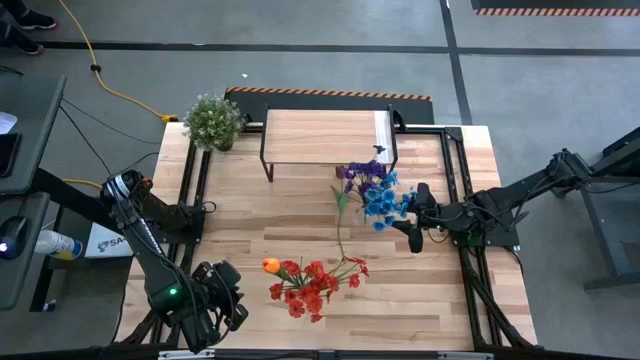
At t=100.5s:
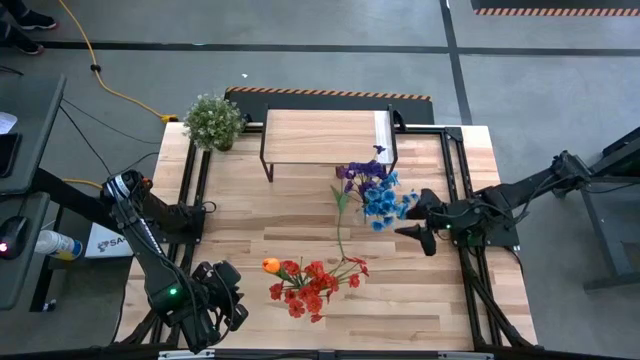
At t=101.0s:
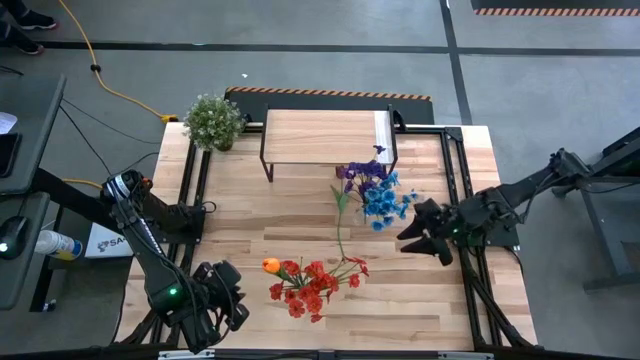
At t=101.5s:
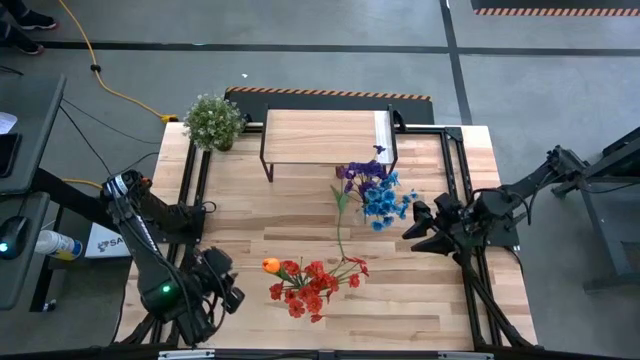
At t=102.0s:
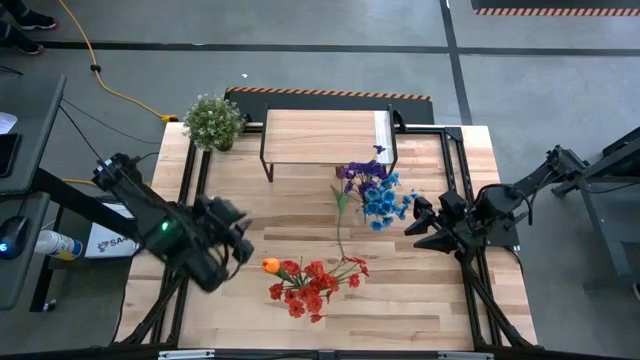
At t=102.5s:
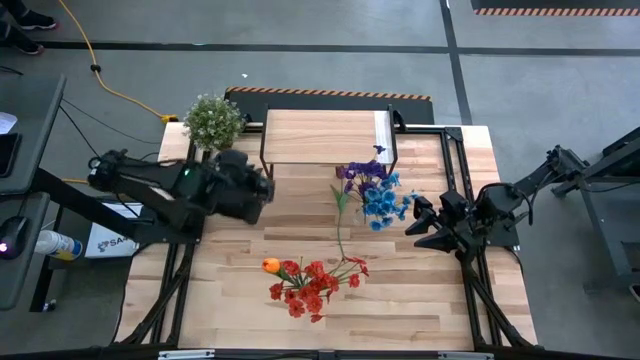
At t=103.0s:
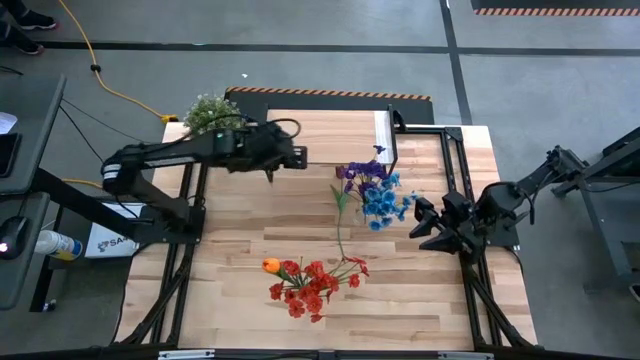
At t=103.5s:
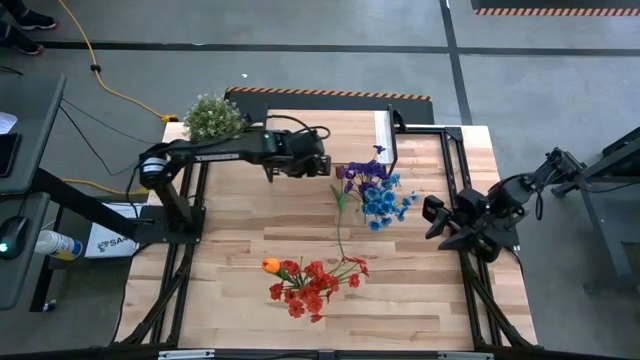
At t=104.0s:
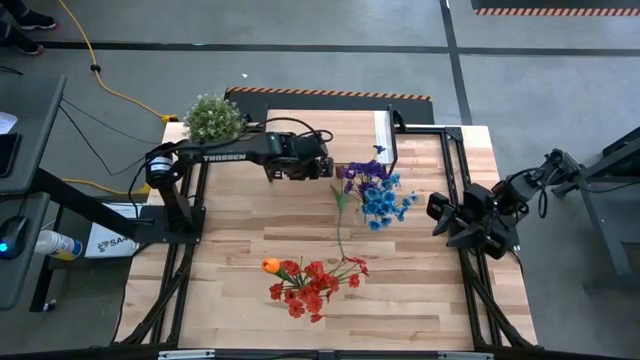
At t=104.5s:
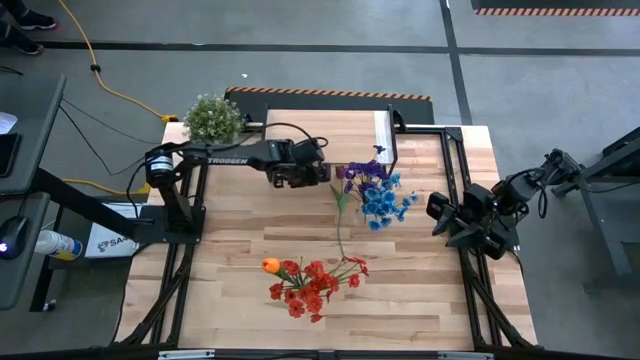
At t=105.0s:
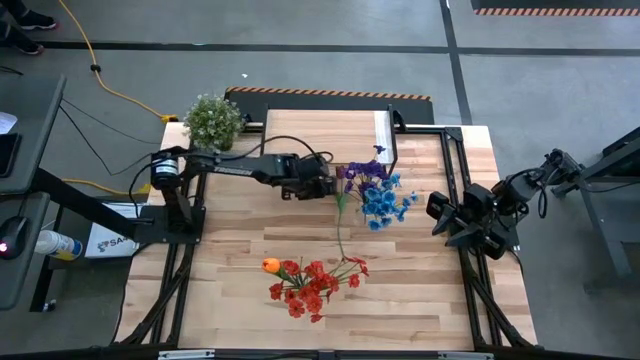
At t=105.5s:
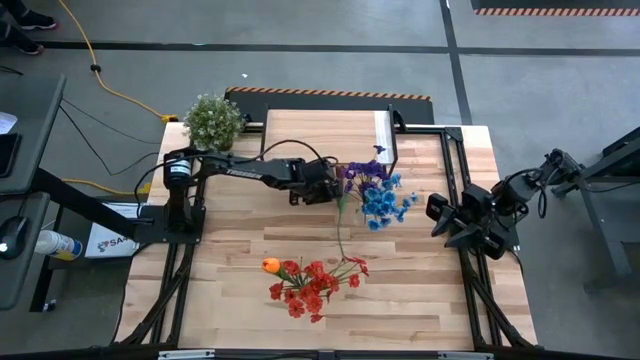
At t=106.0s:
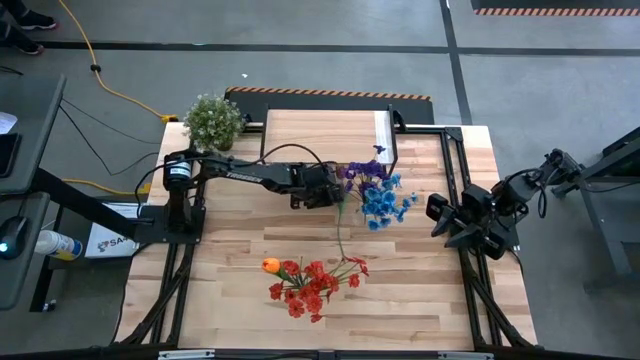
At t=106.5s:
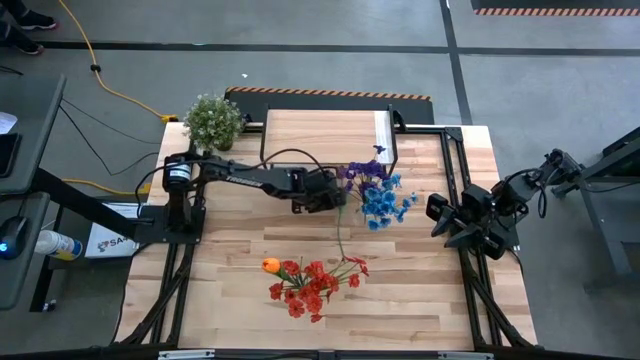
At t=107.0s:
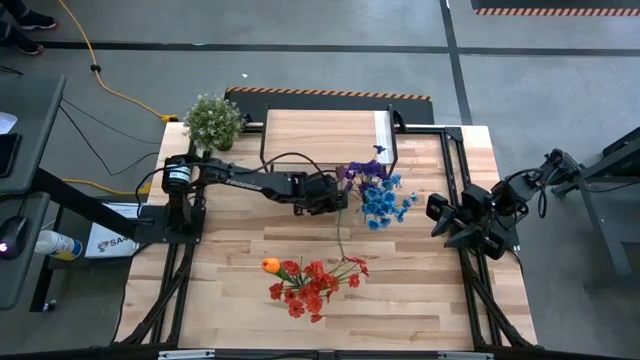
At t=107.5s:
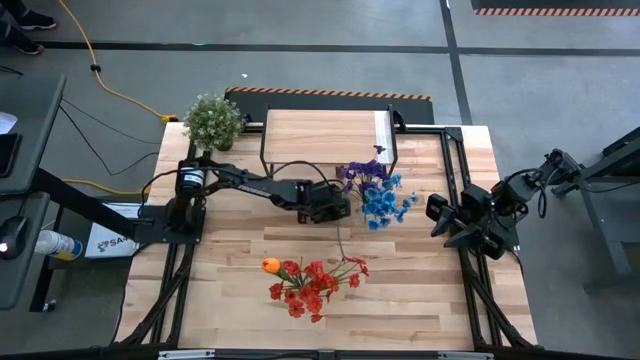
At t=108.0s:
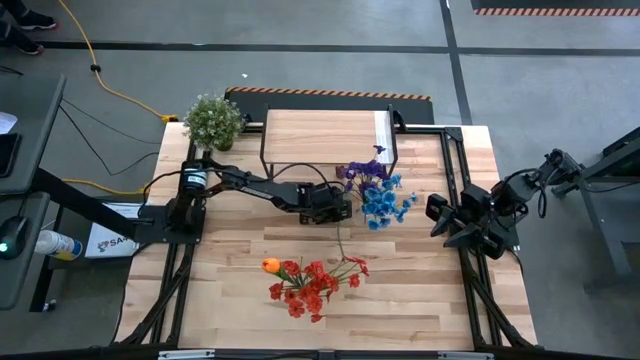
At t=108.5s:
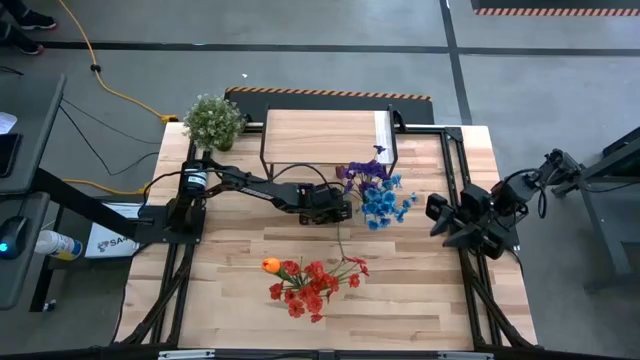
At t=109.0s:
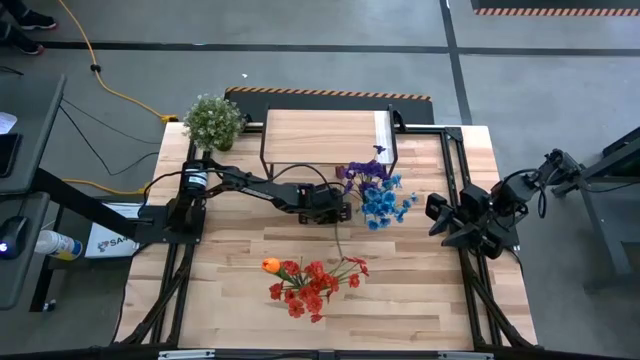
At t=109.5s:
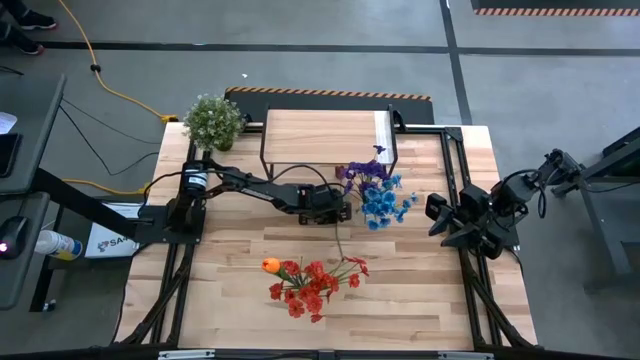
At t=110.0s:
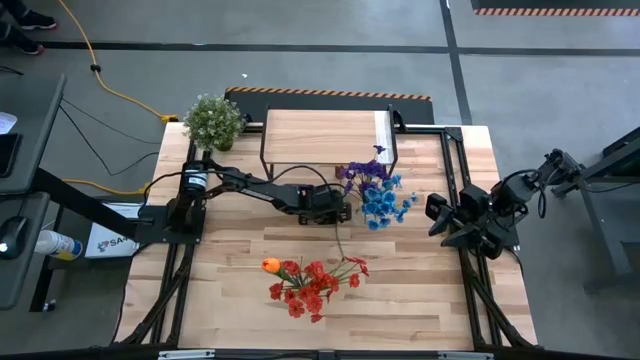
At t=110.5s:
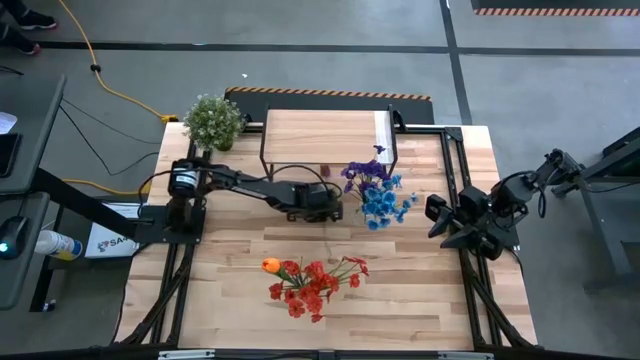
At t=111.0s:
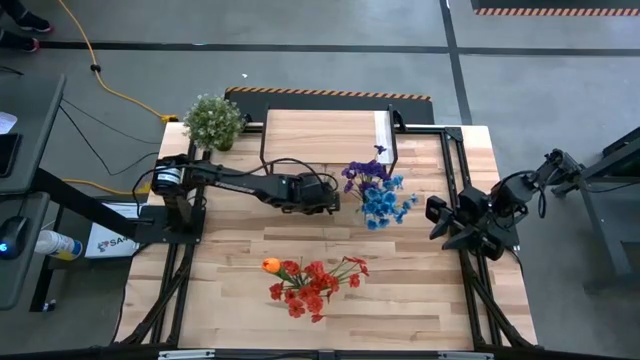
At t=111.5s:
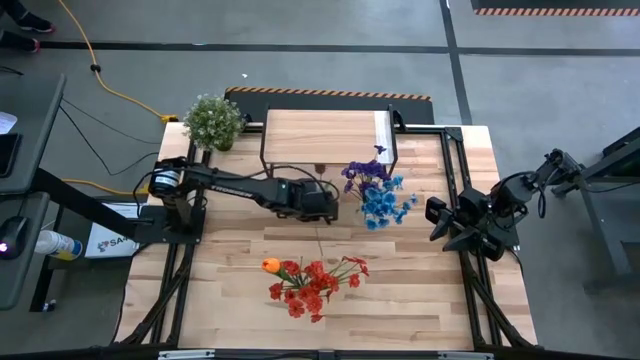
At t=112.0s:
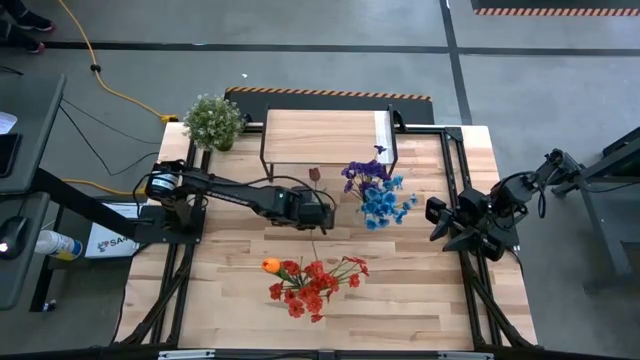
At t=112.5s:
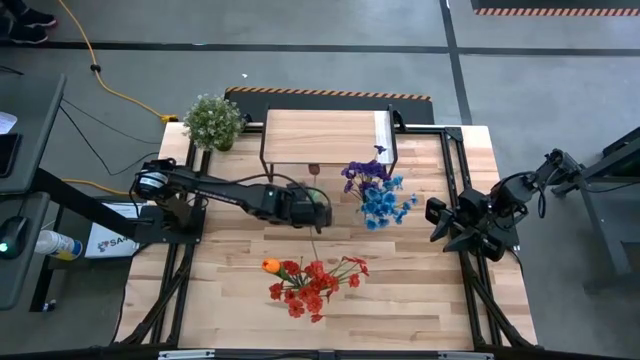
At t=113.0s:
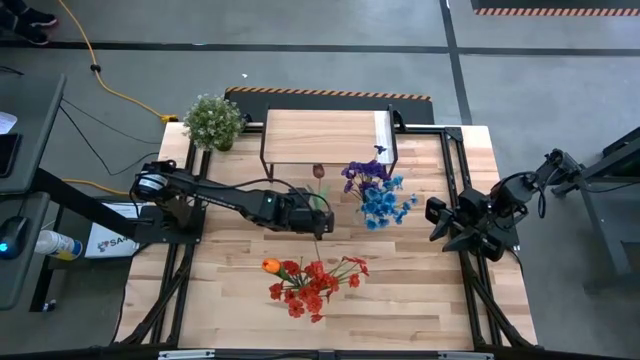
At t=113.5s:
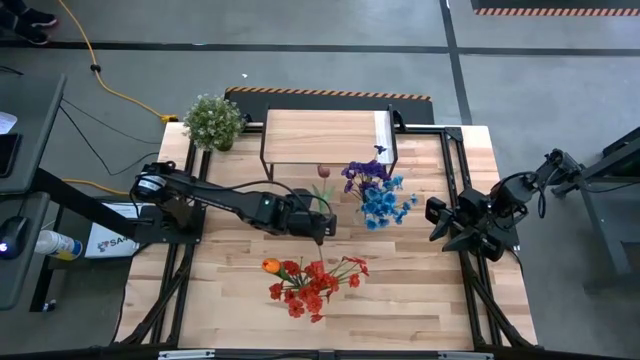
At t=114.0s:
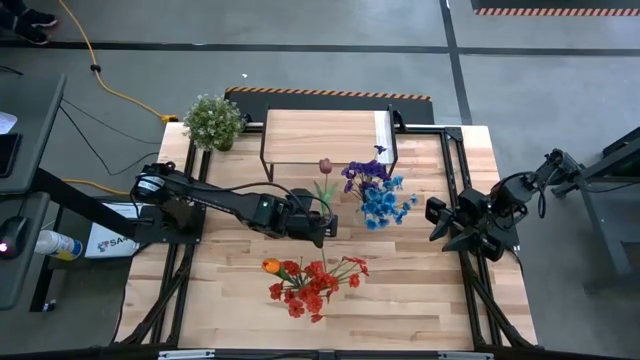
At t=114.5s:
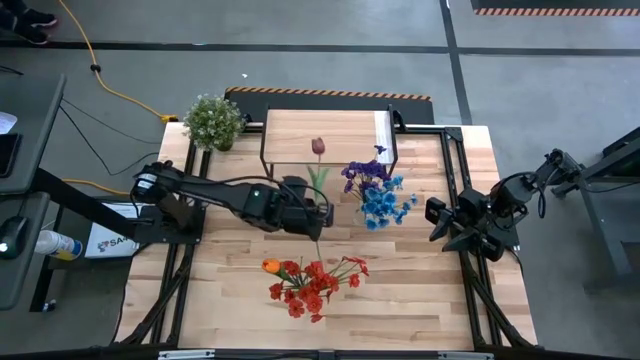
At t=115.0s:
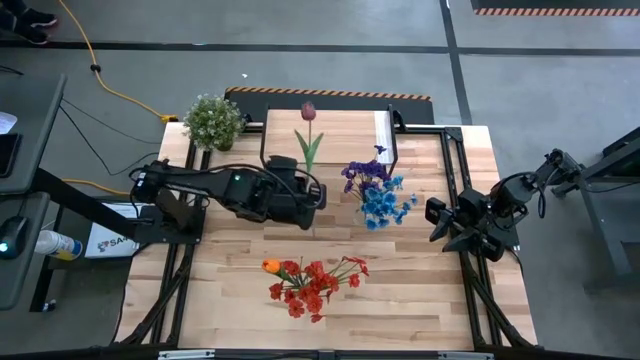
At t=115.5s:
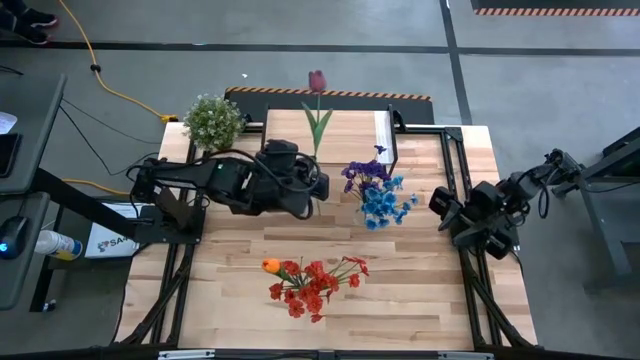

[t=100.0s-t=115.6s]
Task: Pick and place flowers into a vace then onto a shelf
Put the red flower into the top transparent vase

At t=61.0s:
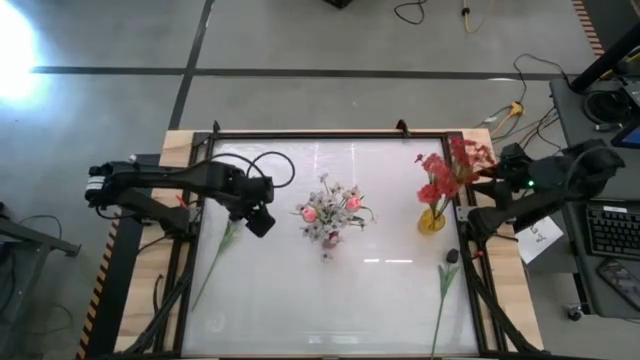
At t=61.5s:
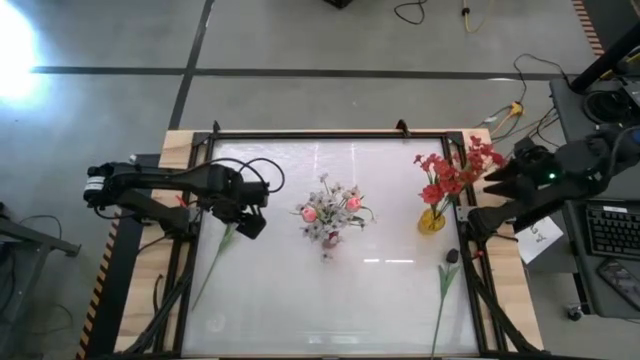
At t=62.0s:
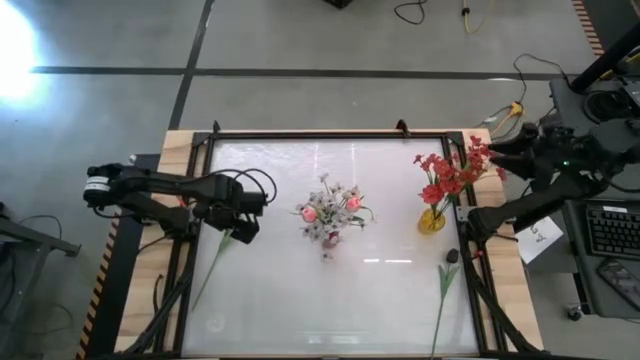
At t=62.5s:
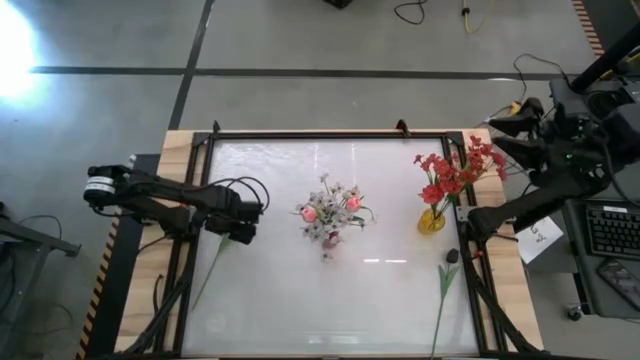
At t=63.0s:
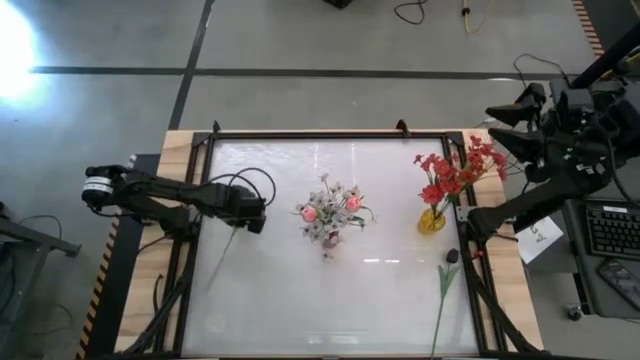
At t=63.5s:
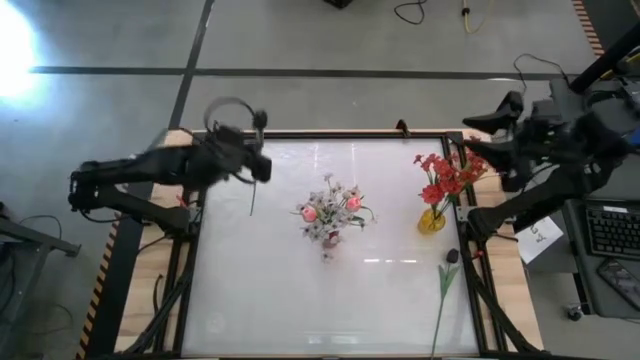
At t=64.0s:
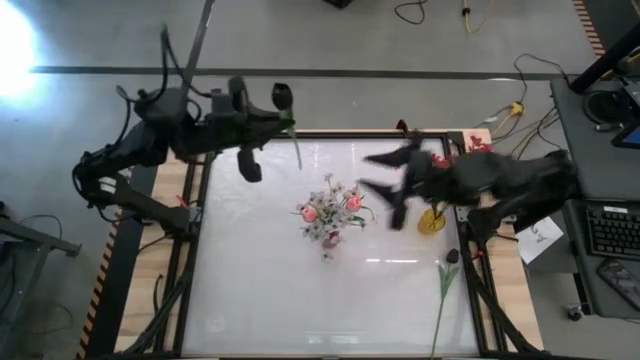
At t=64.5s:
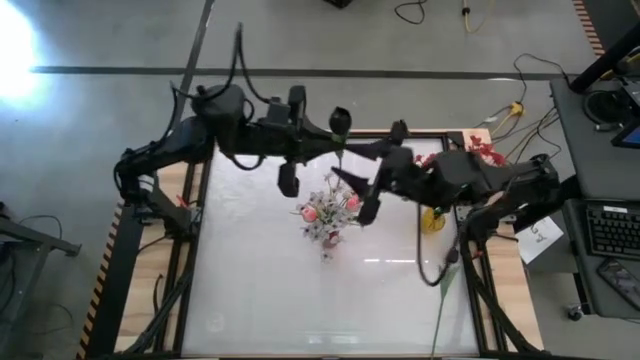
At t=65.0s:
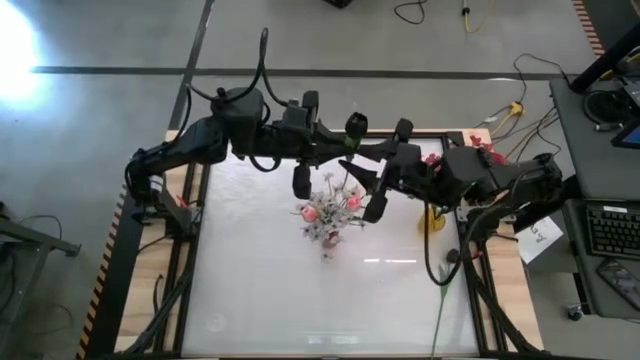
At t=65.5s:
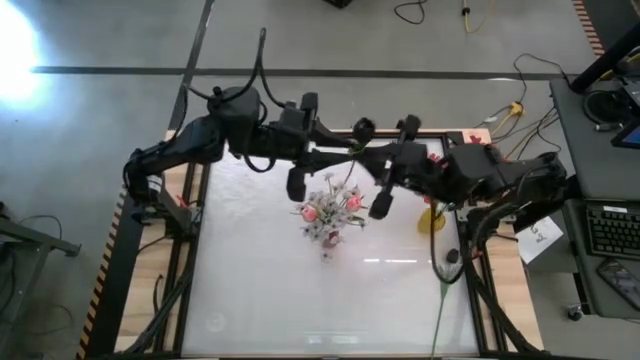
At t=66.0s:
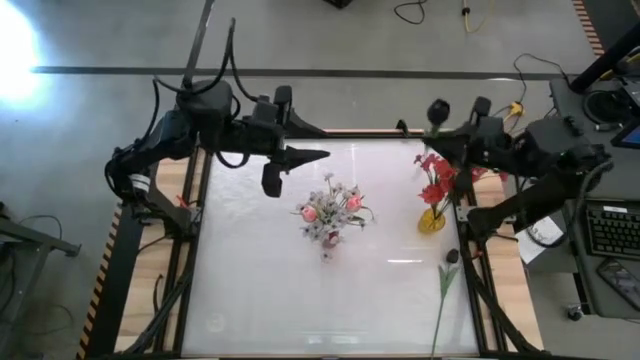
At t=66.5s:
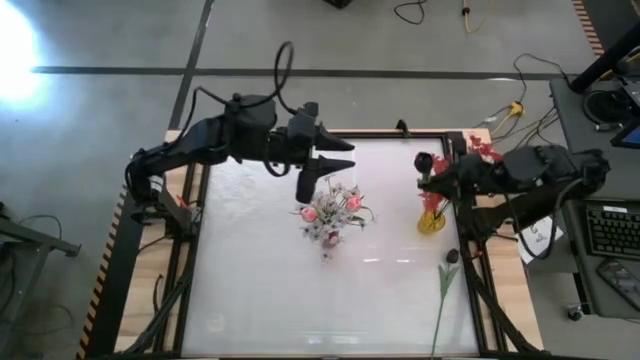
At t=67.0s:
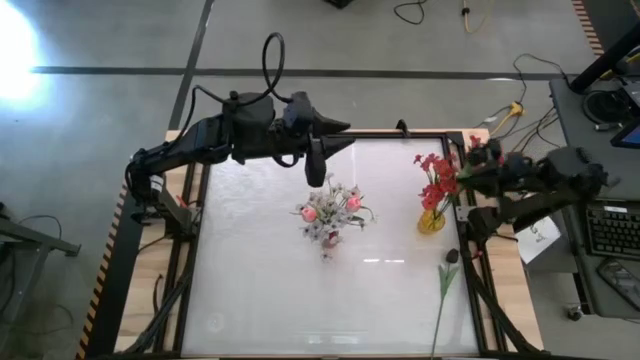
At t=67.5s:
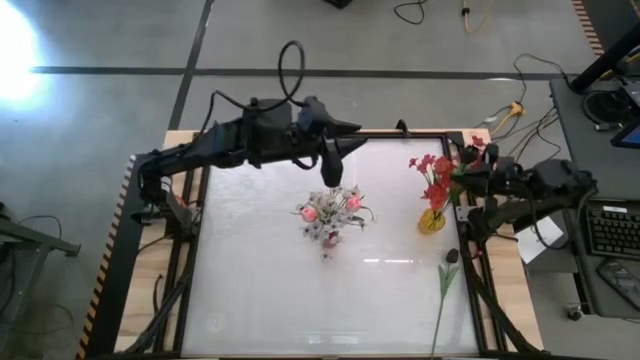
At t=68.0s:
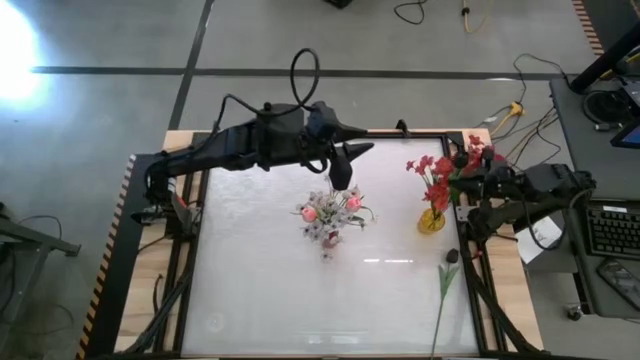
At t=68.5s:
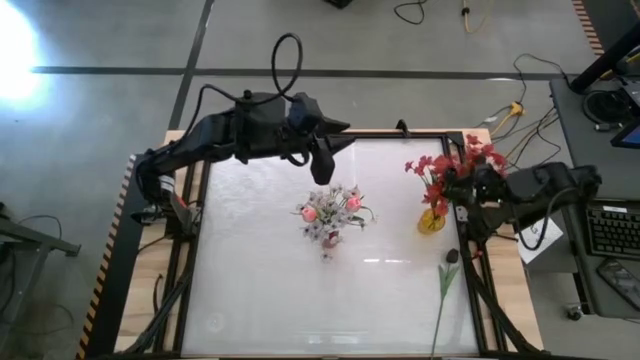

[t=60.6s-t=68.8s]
Task: Sort flowers into vase by color
Put the left black flower into the yellow vase
